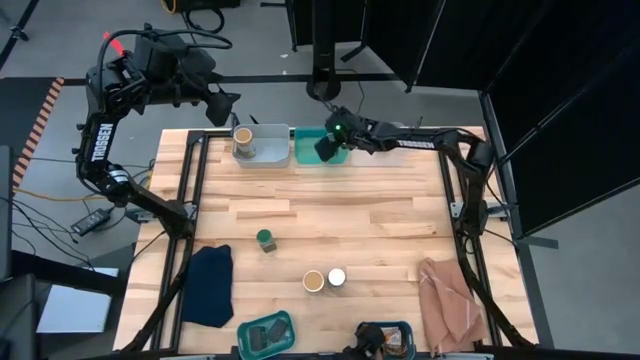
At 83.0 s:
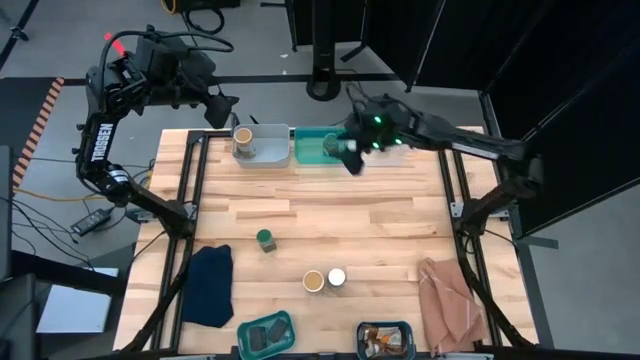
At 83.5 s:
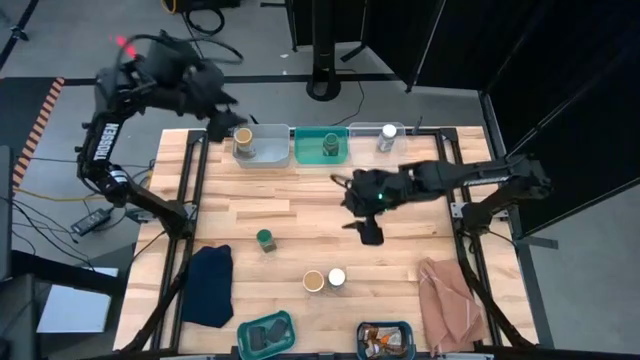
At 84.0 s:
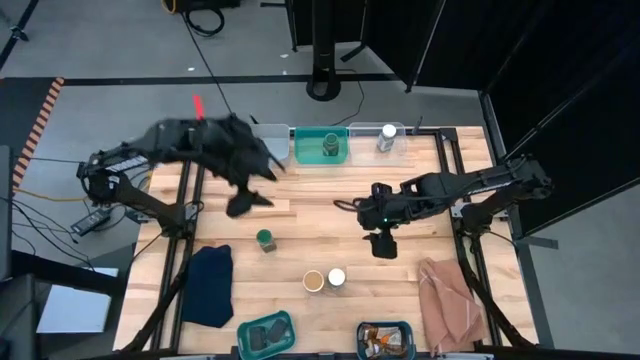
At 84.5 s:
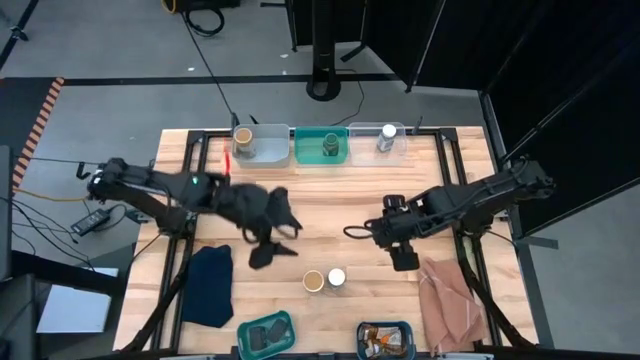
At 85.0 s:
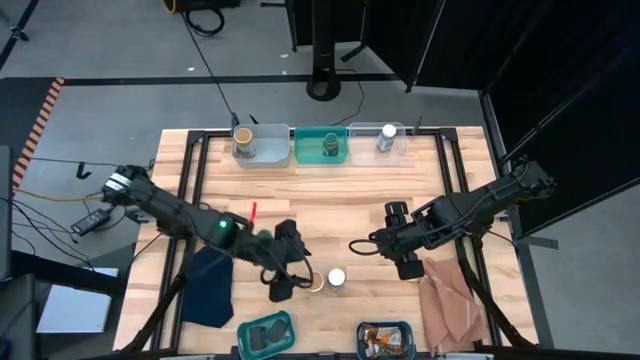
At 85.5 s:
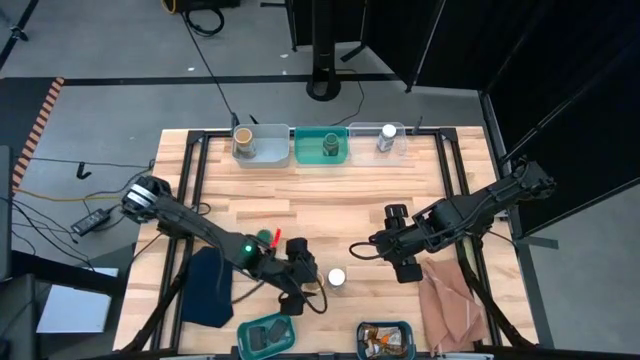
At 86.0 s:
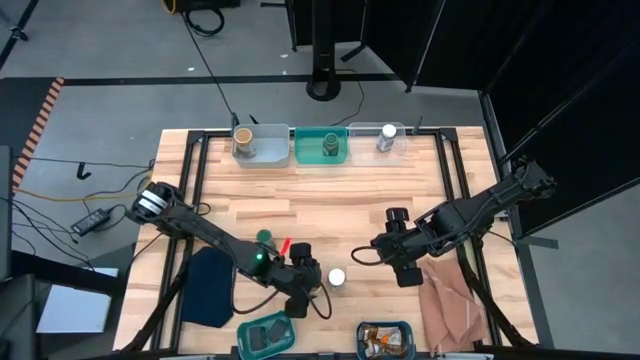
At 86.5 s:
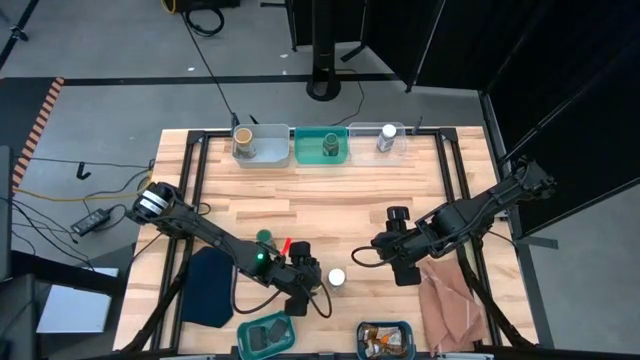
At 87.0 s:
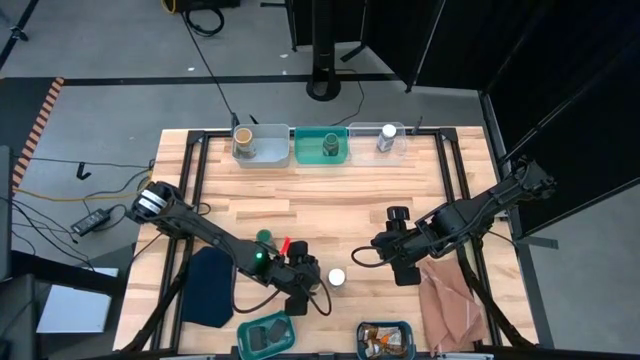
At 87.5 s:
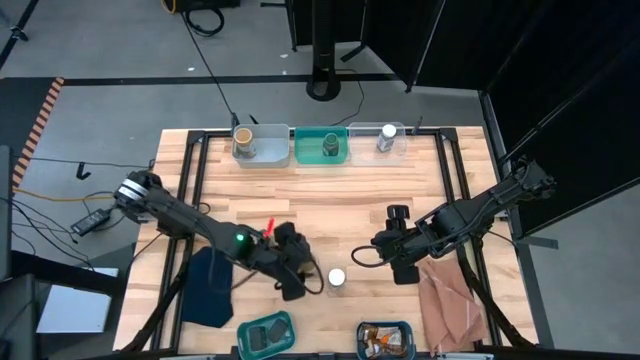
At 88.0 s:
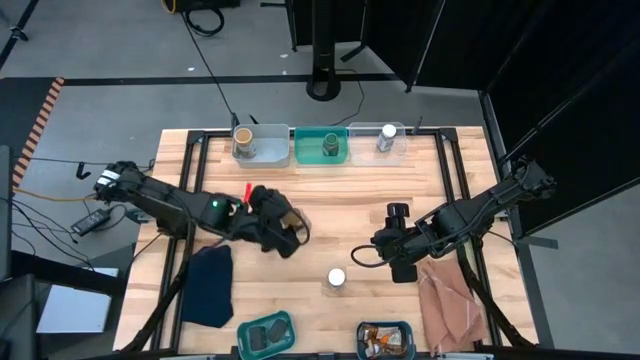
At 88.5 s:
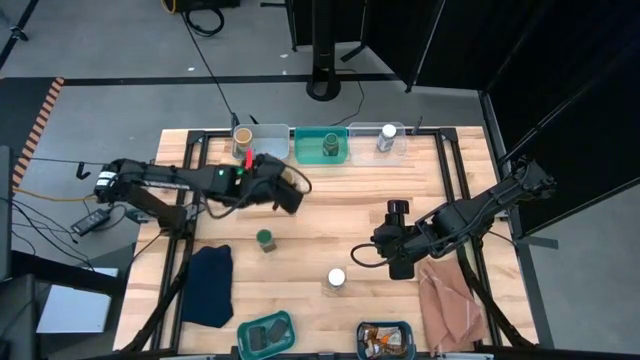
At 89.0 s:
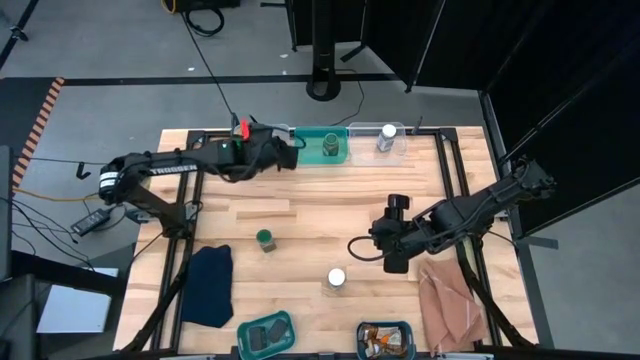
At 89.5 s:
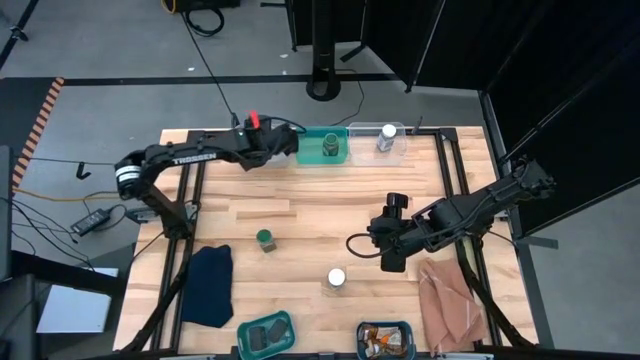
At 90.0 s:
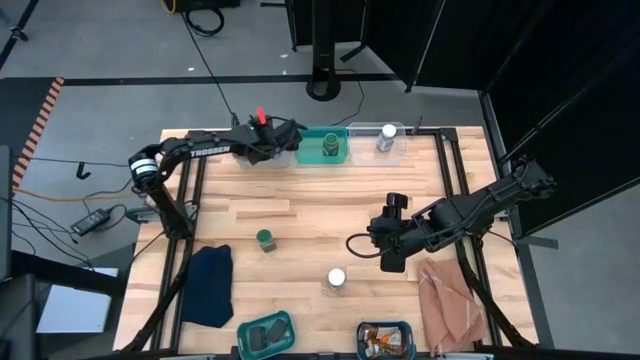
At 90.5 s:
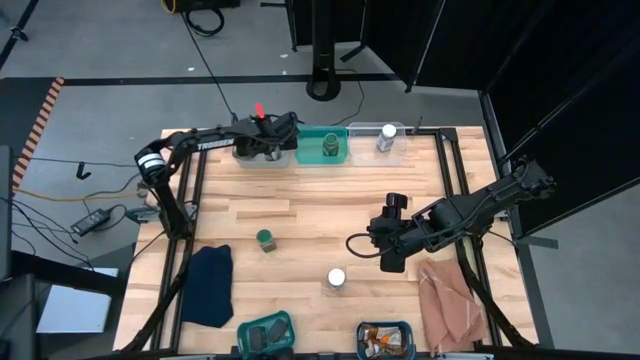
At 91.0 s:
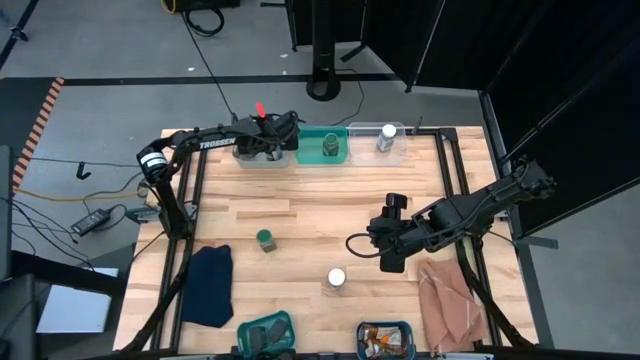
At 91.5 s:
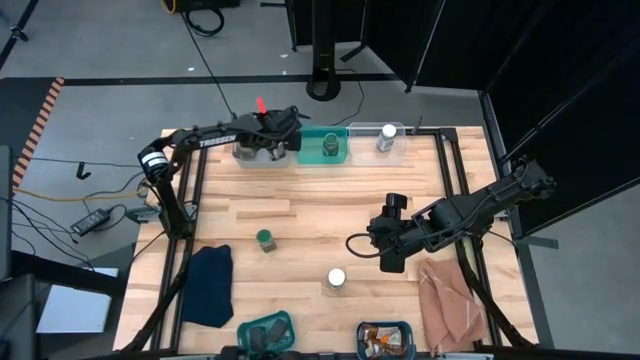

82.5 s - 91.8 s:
Task: Sort spices by type
Put the gold seasoning bottle into the gray bin

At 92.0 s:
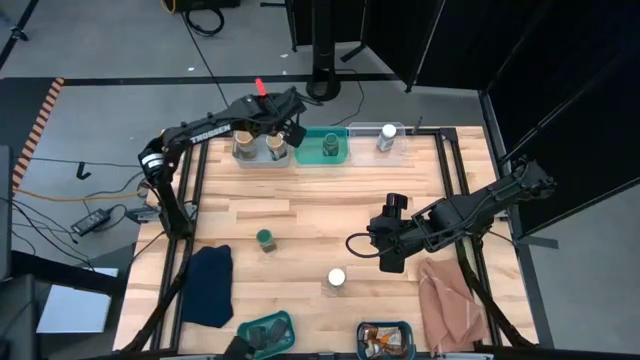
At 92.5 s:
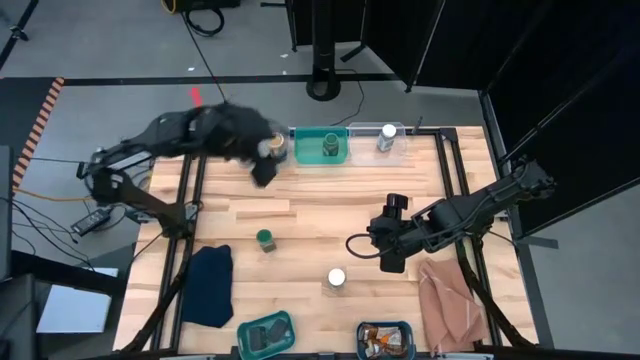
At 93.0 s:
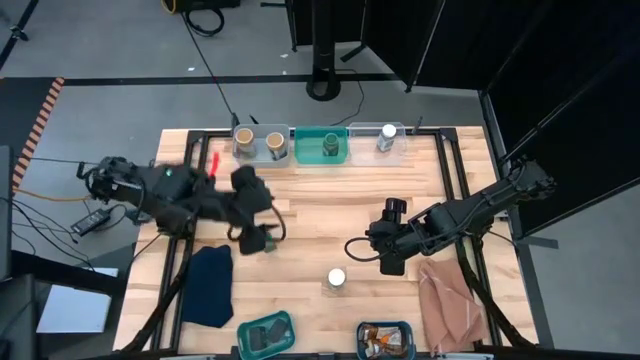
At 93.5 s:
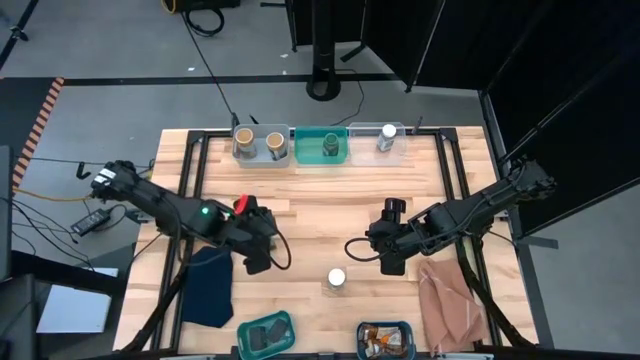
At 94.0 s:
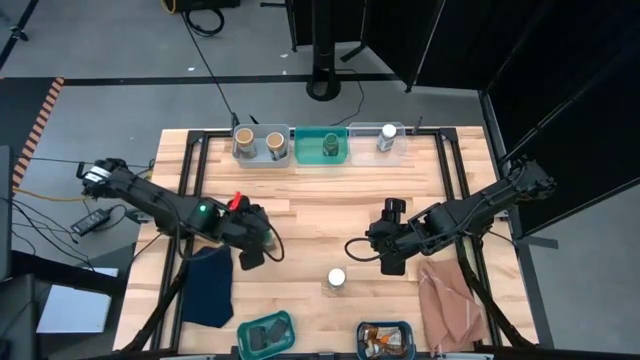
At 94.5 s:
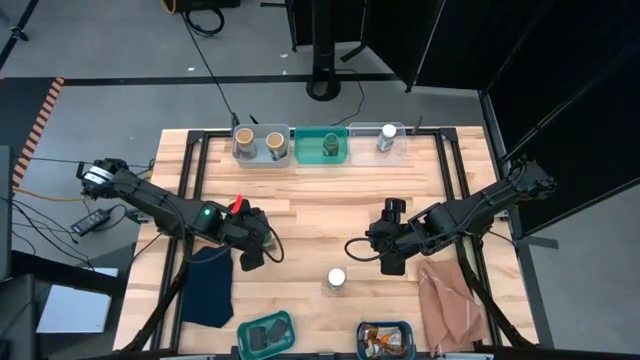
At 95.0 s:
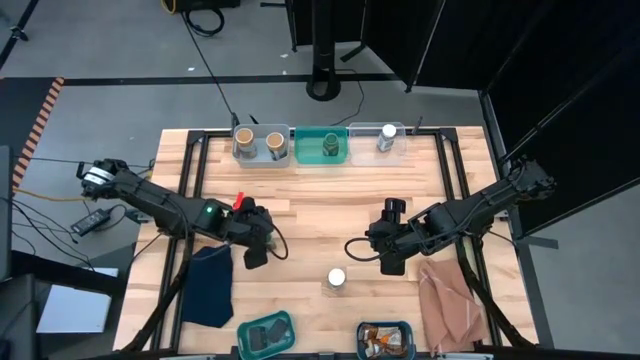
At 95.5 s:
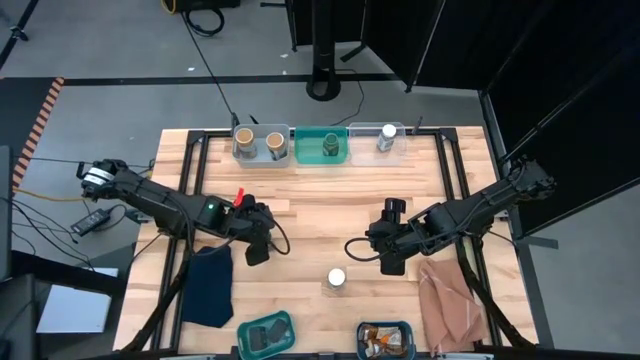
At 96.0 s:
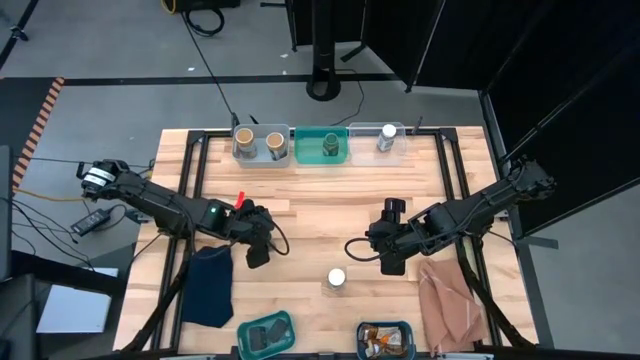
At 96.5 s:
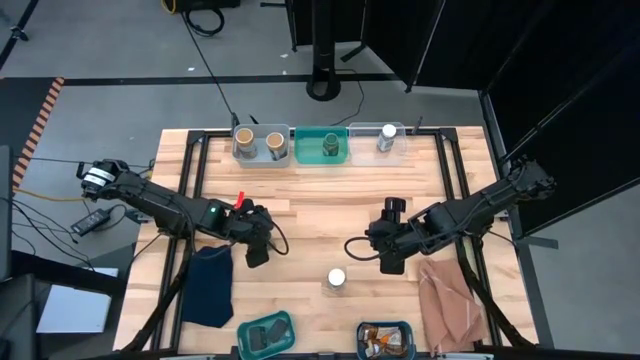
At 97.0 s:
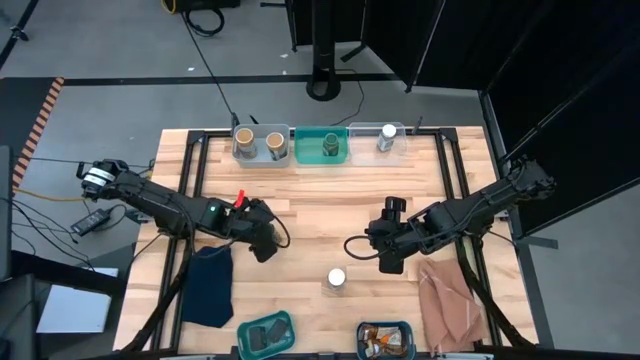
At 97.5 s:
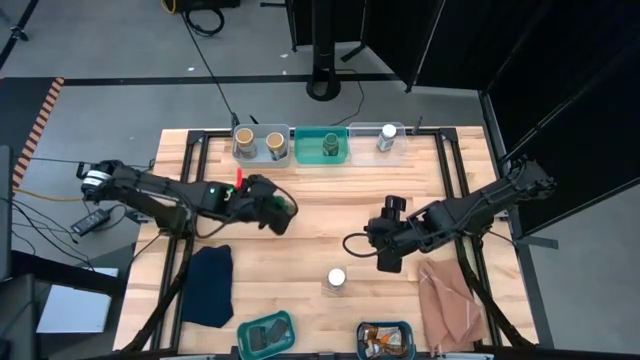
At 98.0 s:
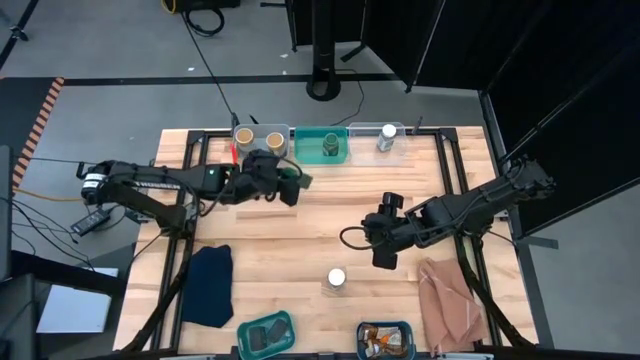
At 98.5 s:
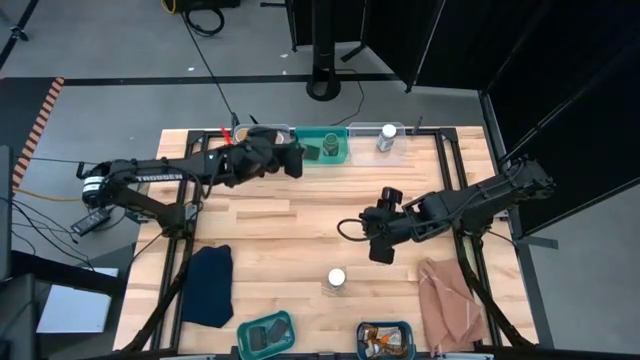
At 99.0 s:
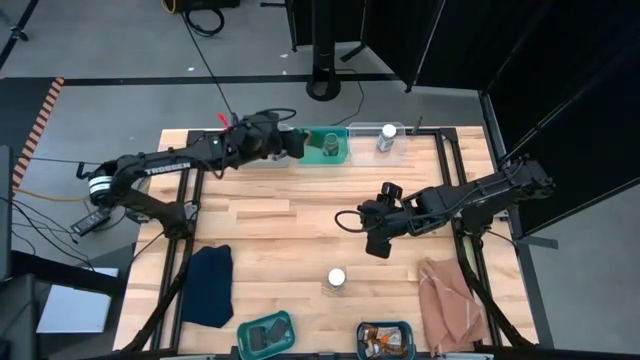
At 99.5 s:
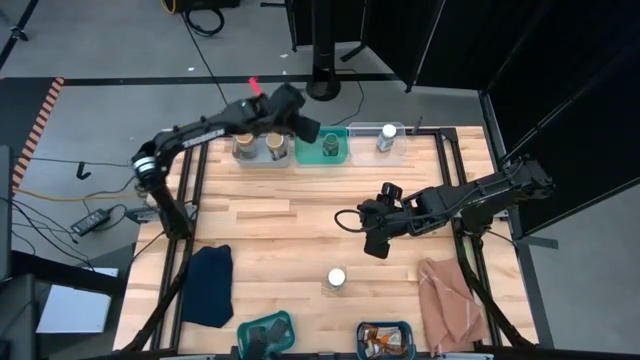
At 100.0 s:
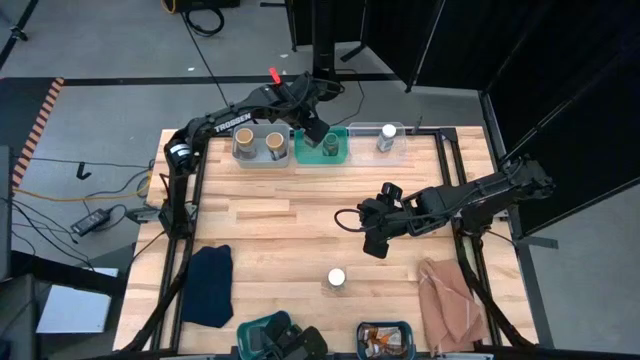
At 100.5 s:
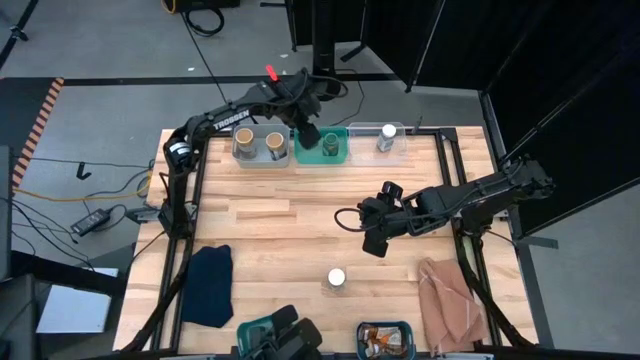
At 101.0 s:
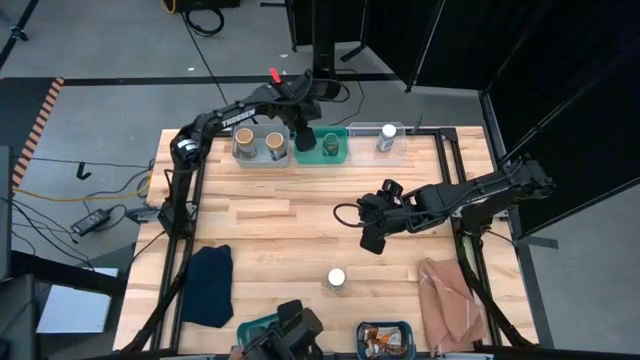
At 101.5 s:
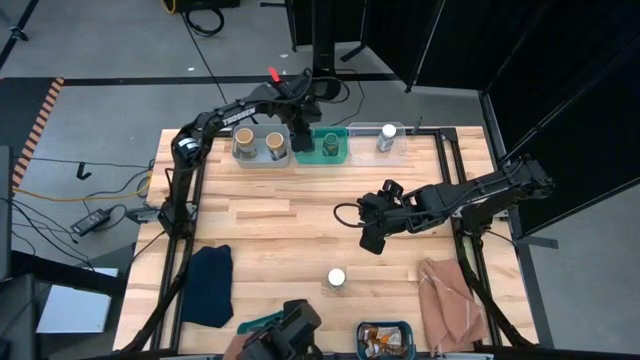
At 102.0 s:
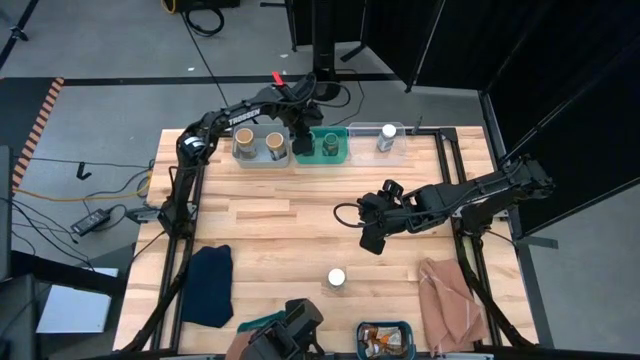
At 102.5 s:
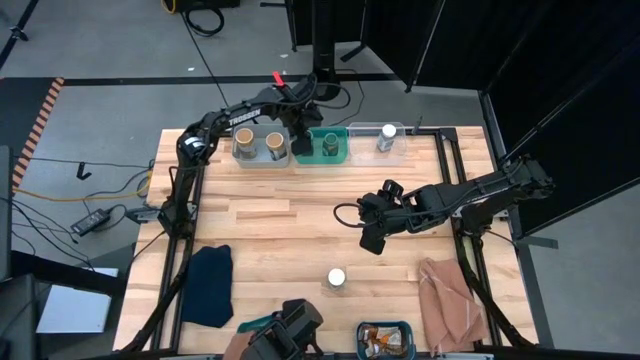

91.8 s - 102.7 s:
Put the green seasoning bottle into the green bin

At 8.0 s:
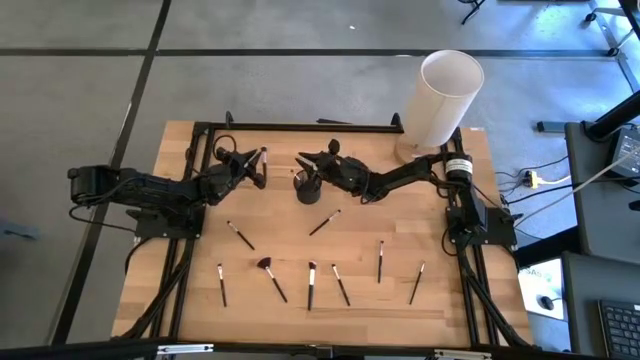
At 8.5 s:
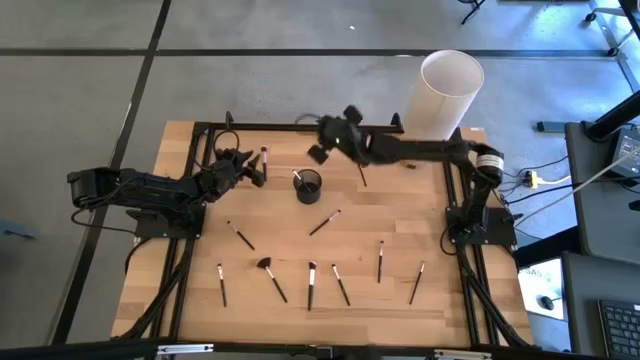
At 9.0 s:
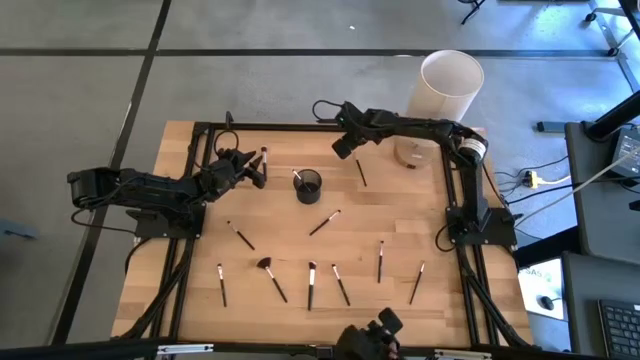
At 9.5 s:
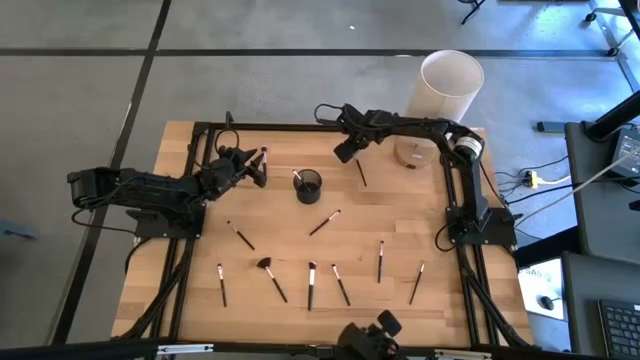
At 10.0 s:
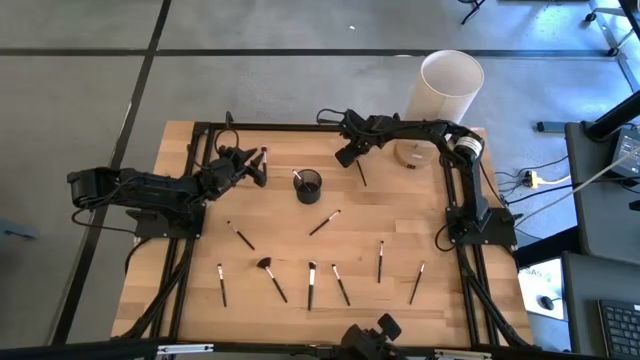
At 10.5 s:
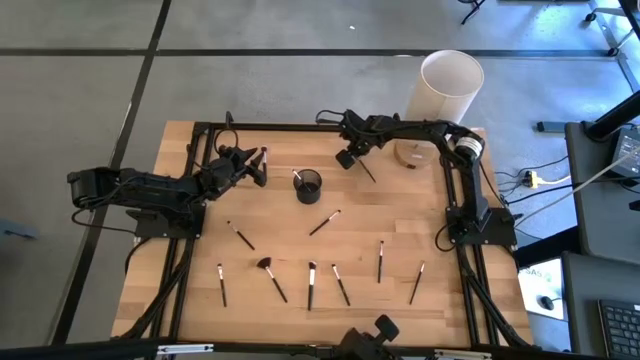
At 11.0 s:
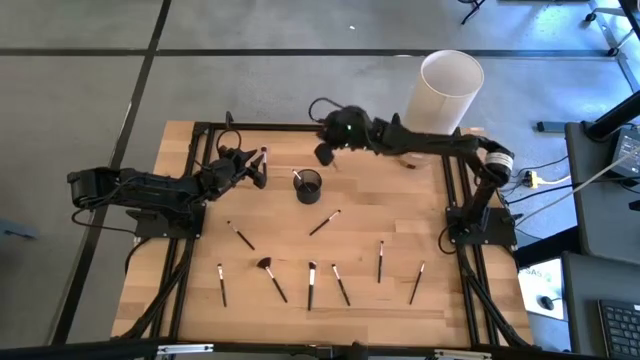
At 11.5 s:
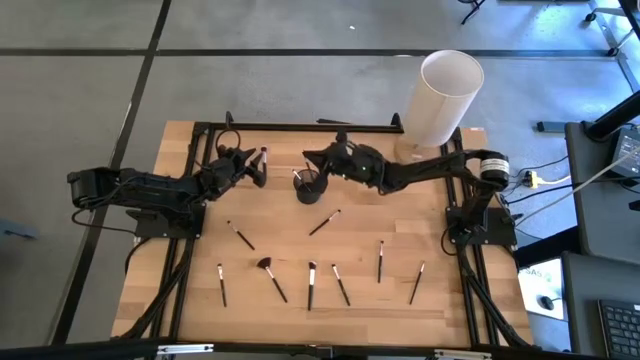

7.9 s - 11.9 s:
Task: Put items in baskets/containers
Put the black eyeshadow brush into the black pen holder
